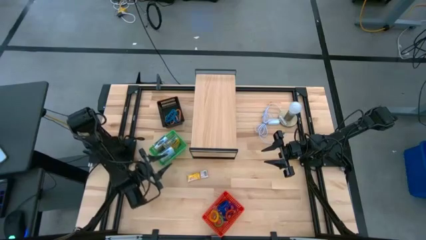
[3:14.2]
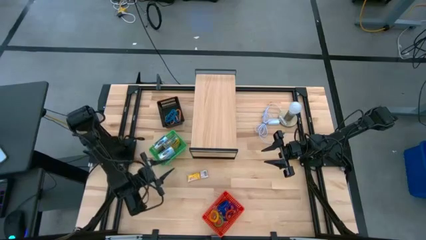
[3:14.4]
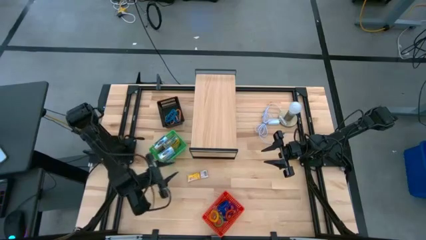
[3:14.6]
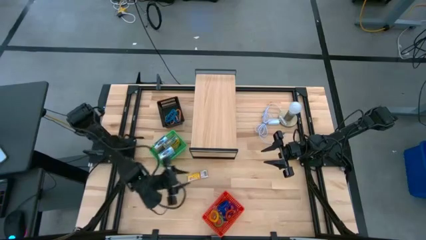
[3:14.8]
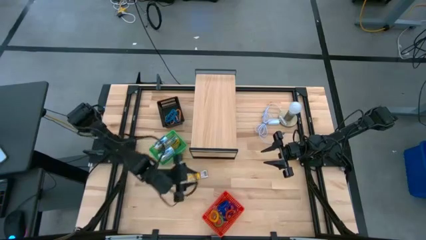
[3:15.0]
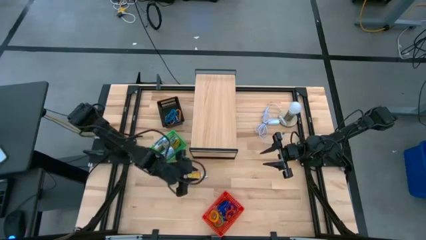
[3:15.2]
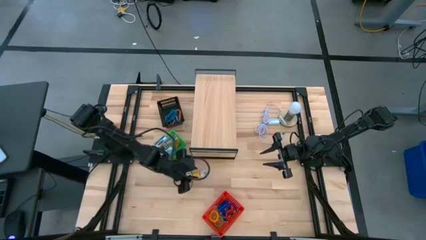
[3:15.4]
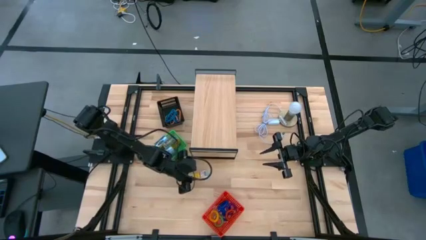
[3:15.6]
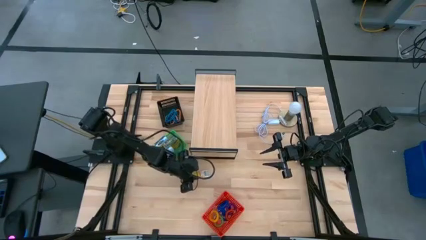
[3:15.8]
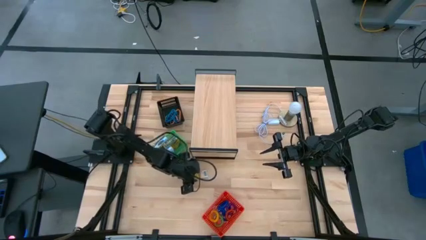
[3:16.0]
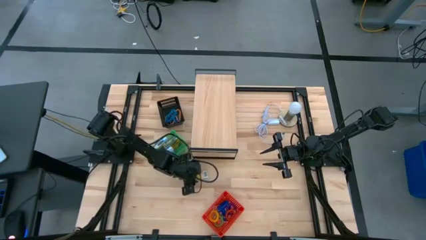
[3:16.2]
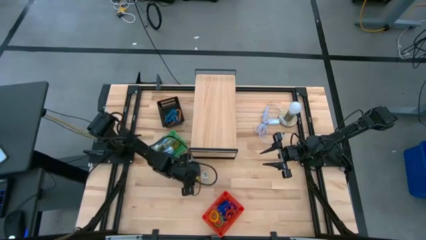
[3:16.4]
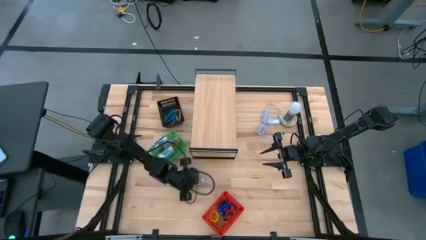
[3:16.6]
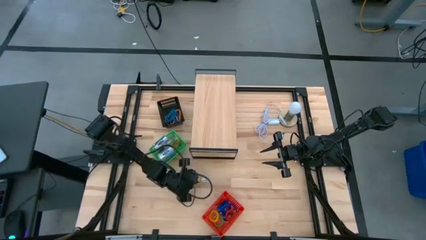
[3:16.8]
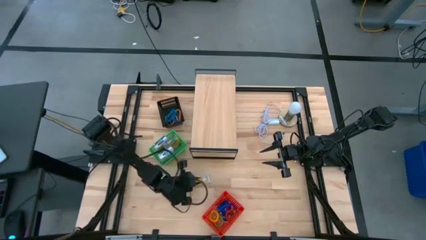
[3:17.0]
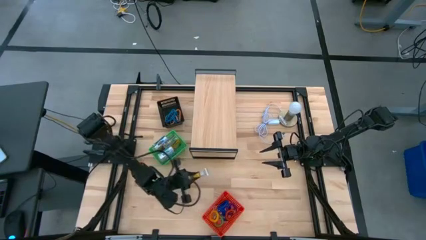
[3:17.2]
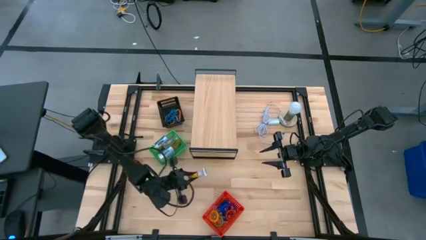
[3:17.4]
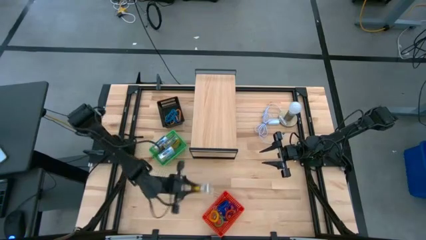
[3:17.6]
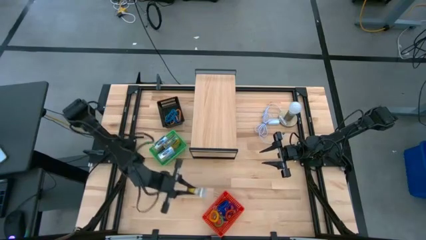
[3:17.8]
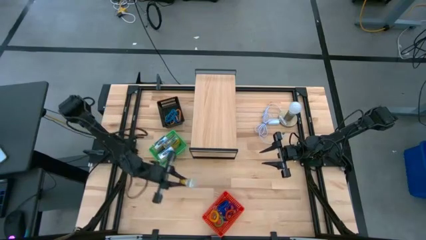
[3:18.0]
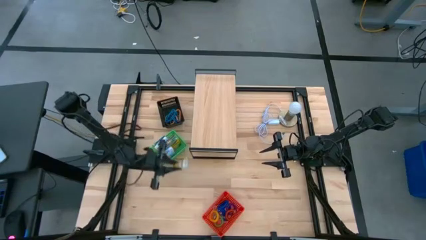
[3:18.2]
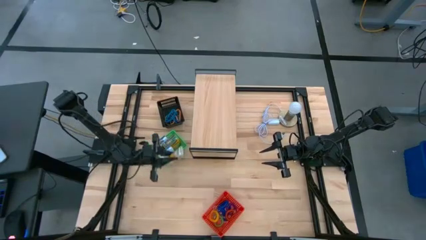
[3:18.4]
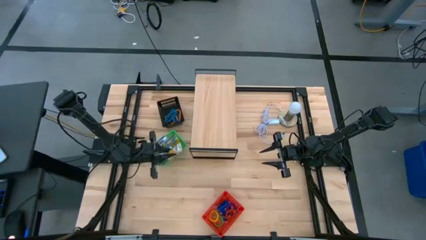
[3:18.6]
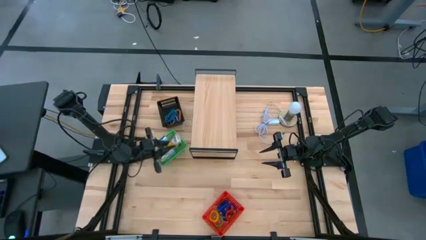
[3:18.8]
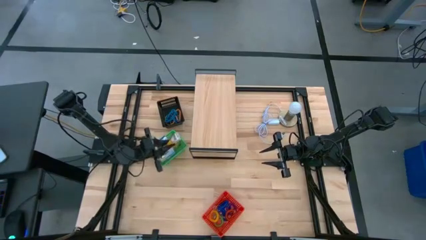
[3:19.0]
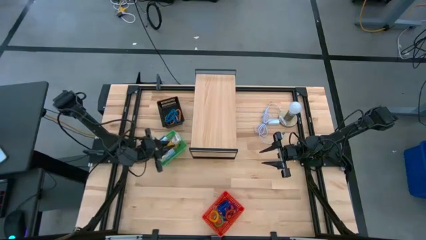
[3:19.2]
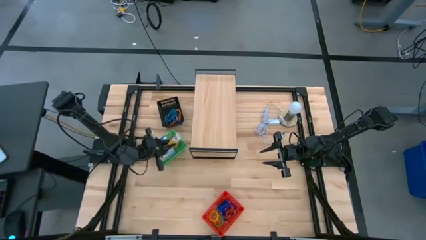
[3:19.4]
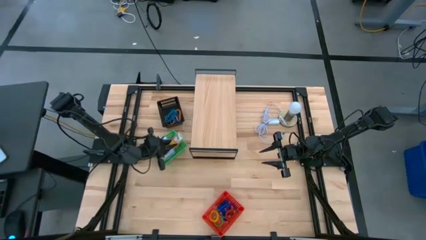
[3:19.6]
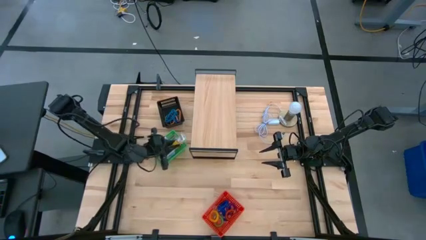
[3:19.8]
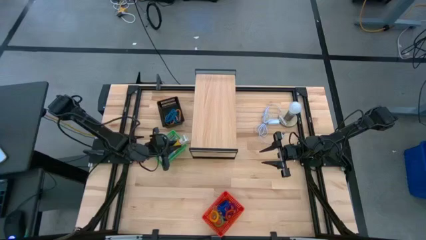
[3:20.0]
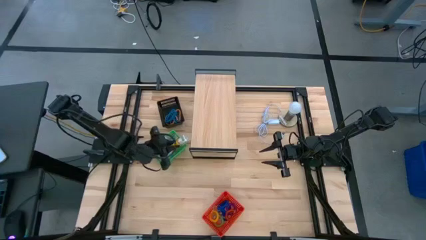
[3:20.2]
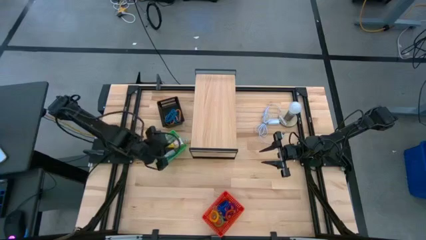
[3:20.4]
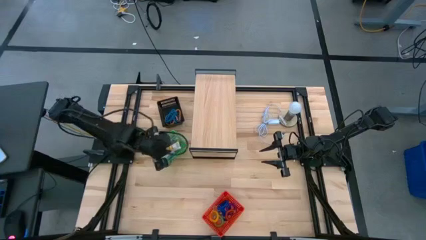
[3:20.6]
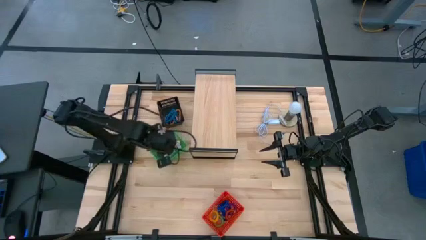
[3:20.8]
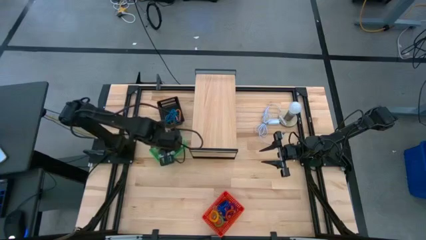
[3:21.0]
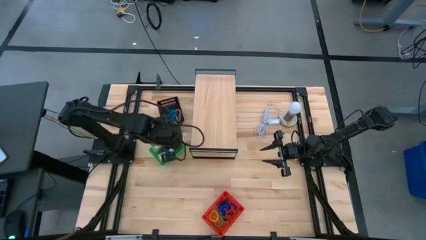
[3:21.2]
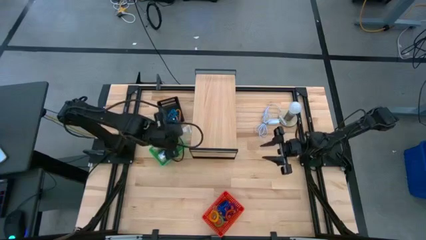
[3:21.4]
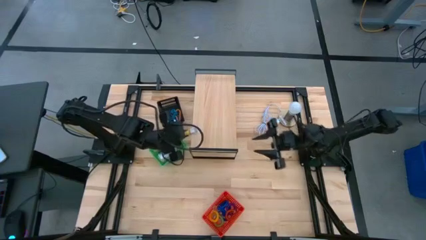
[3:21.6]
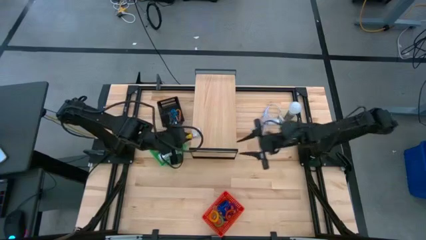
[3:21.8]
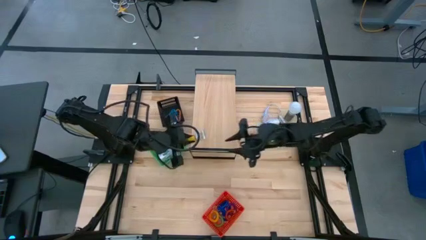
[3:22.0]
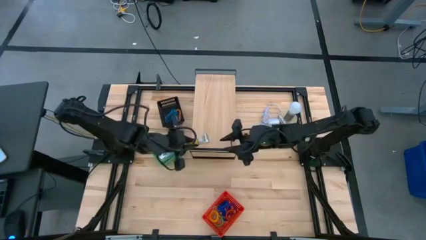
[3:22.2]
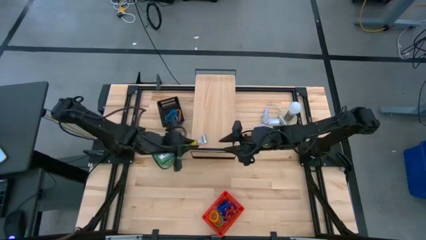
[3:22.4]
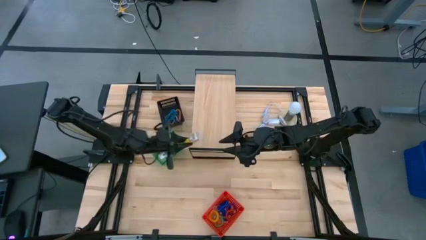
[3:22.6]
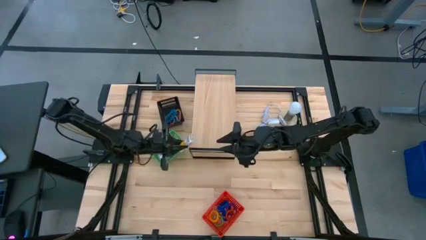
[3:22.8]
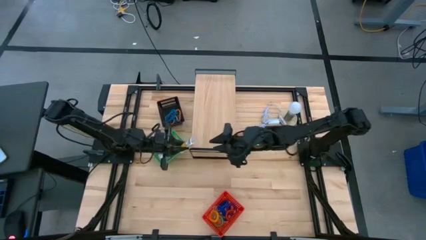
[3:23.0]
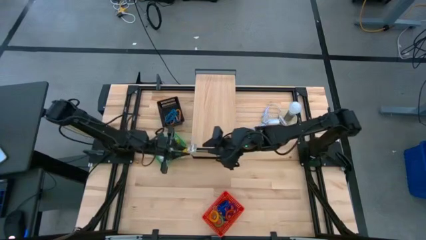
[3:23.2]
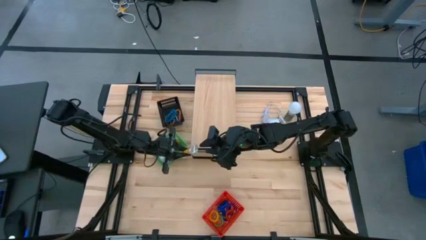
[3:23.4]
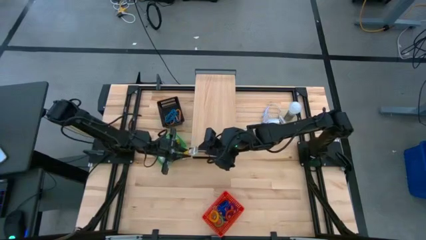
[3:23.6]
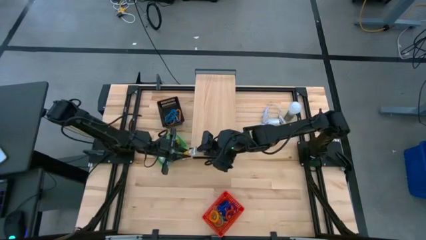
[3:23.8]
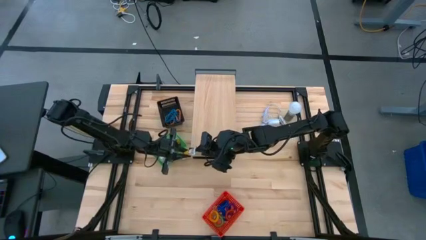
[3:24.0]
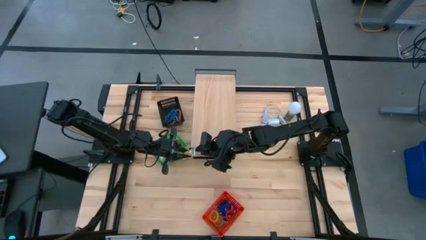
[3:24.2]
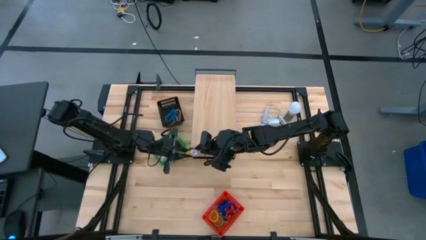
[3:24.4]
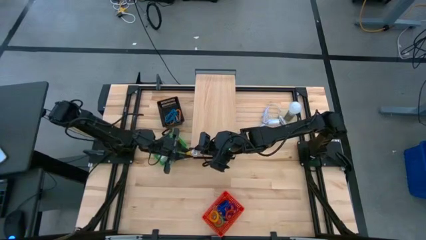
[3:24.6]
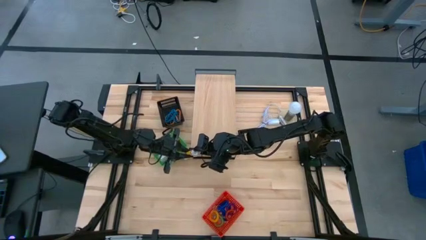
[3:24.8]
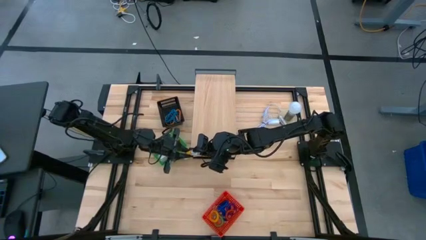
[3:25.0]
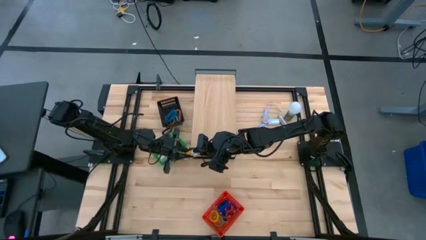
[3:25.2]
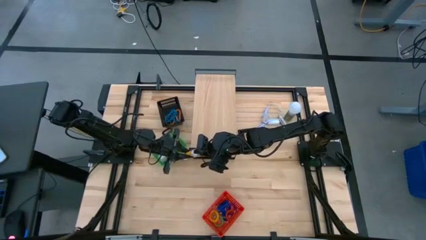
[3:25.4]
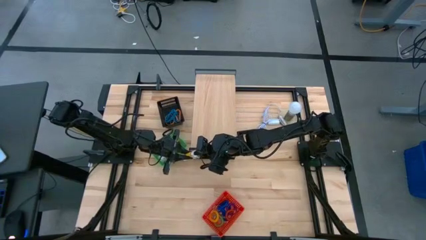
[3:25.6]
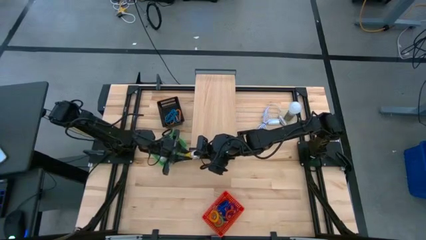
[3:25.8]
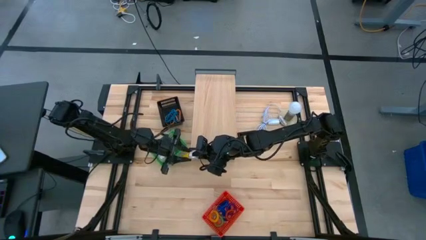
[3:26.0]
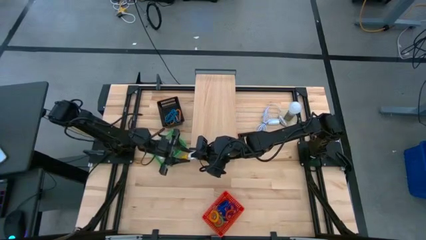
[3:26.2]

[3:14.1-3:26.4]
Task: Pick & Place Office Desk Supplies
Put the small yellow crayon box into the green basket

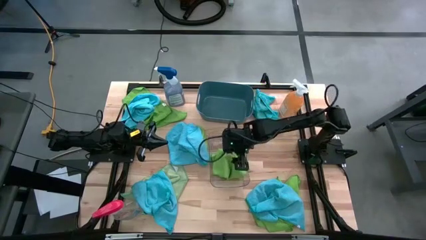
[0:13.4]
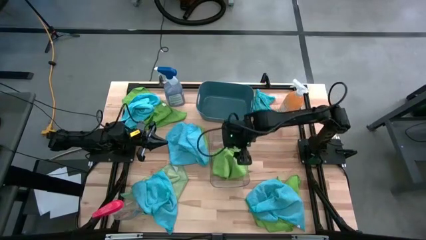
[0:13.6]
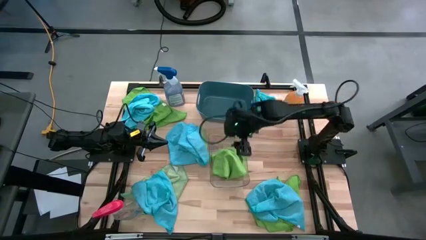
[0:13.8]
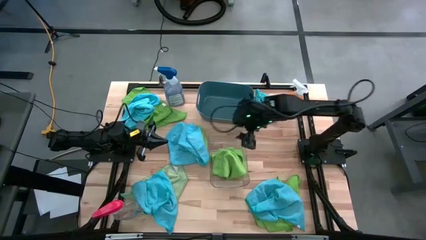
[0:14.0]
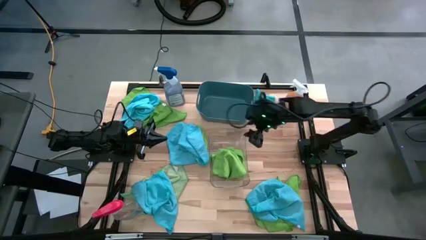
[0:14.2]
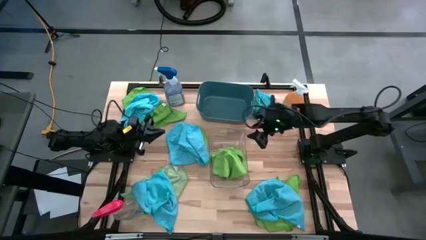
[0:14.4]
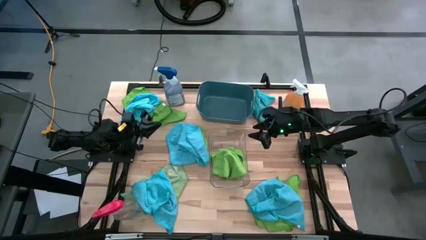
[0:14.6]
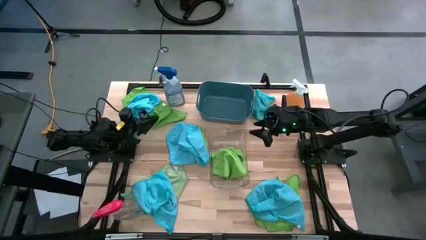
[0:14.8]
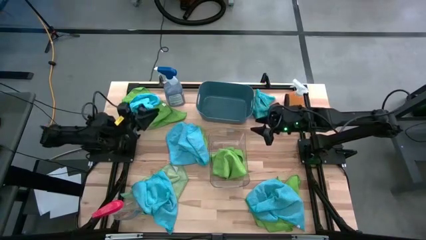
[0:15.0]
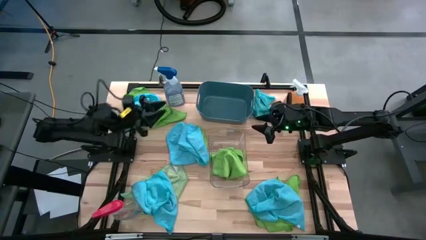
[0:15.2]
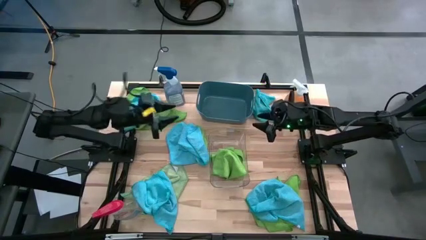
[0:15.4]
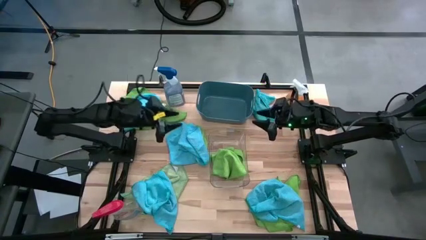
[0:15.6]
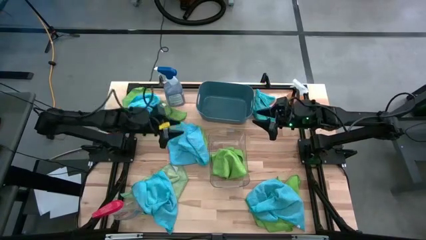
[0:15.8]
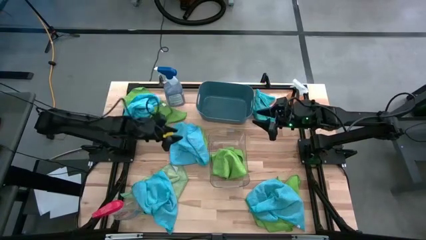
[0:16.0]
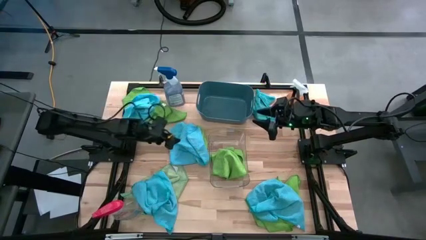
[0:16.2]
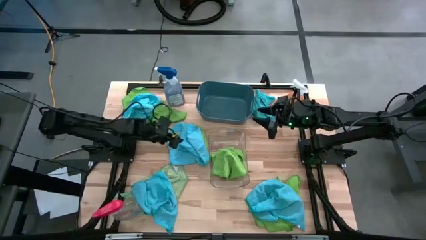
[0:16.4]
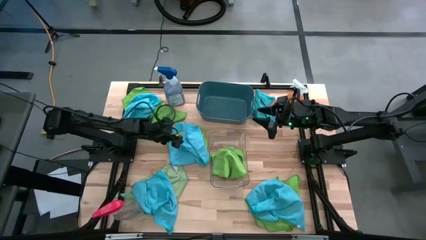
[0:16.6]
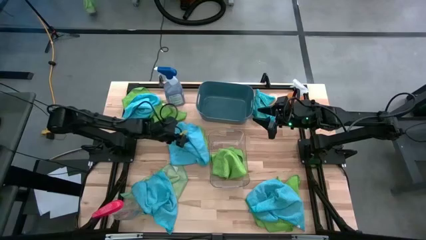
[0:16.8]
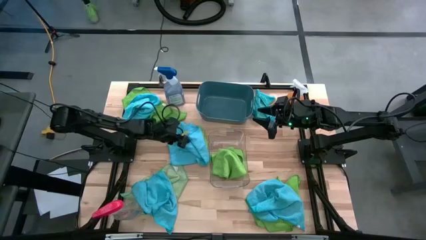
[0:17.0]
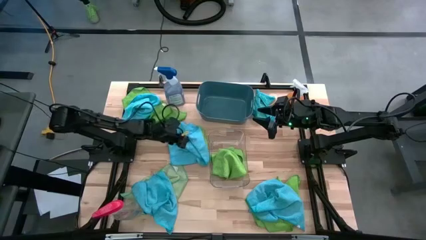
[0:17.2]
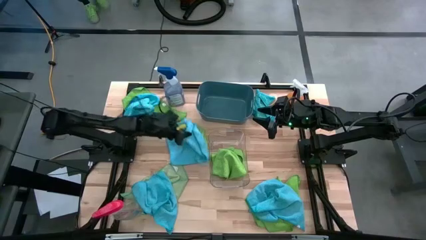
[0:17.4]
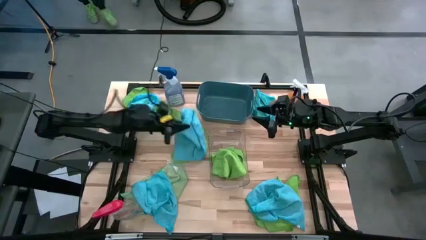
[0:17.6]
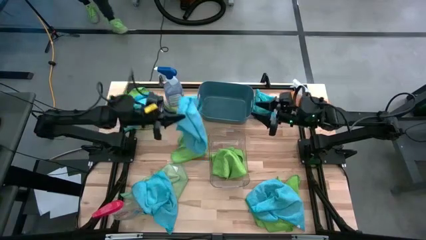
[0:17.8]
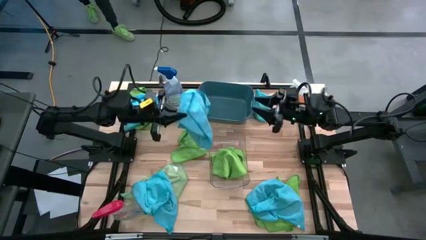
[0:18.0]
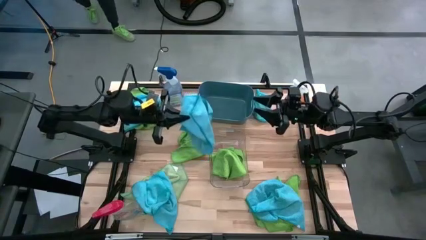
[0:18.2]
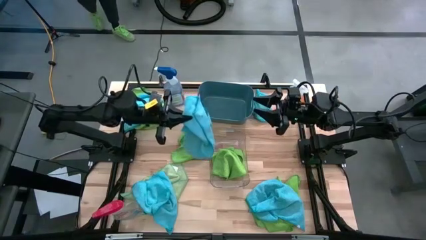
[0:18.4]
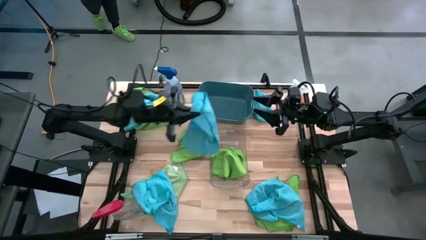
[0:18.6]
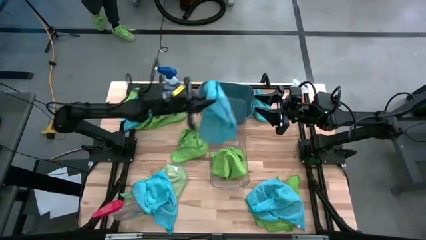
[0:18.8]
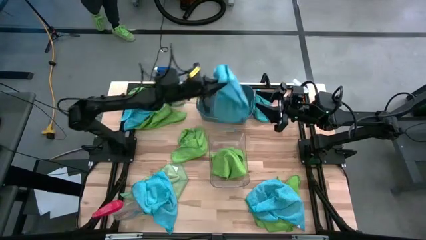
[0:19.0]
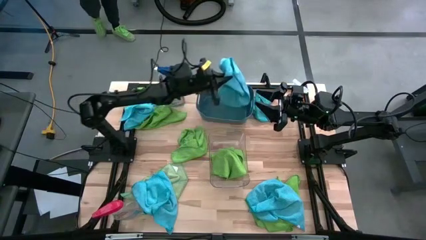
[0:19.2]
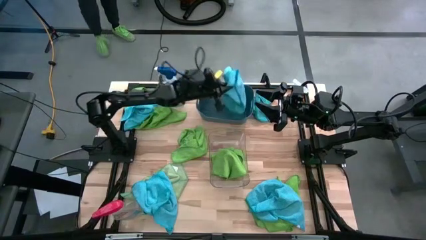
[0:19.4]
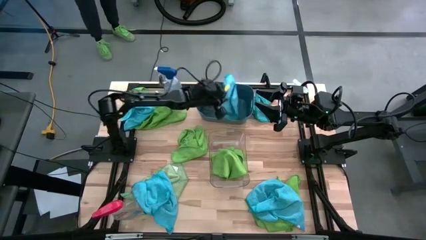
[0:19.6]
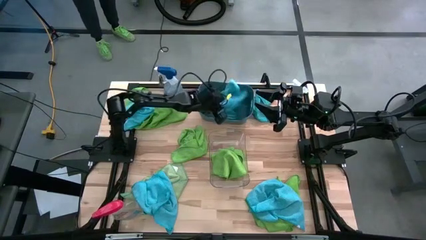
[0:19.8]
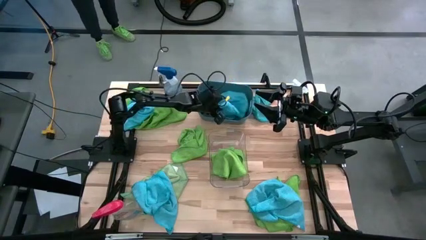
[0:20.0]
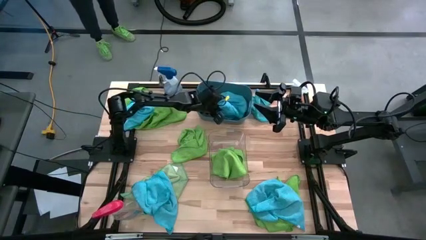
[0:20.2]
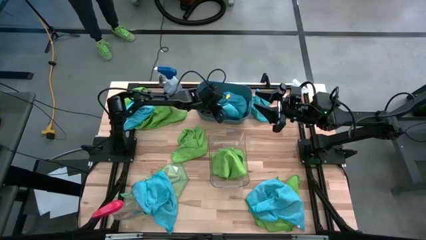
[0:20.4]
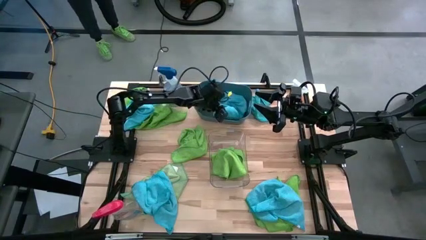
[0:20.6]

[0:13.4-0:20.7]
Task: Sort microfiber towel by color & place in baskets
Put the blue microfiber towel into the blue bin
